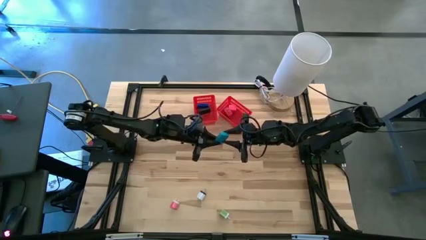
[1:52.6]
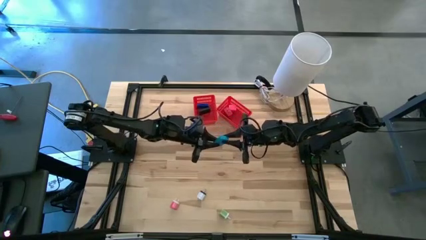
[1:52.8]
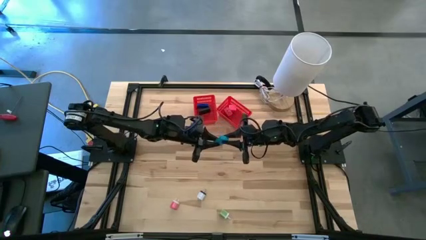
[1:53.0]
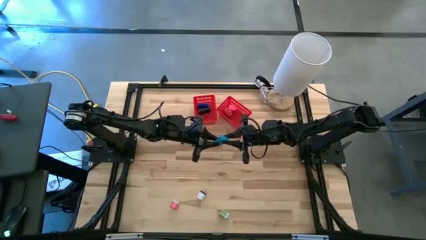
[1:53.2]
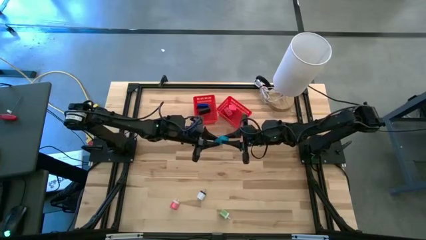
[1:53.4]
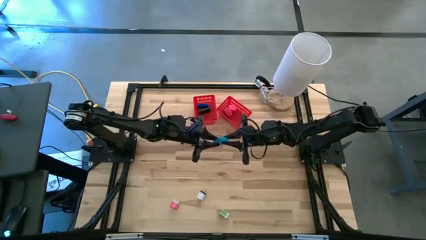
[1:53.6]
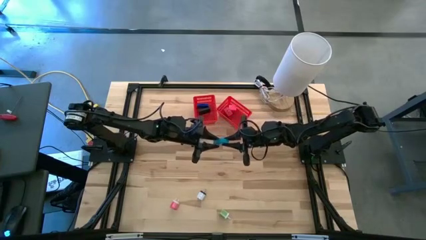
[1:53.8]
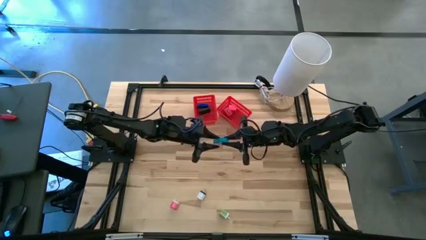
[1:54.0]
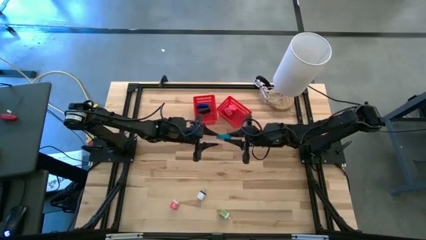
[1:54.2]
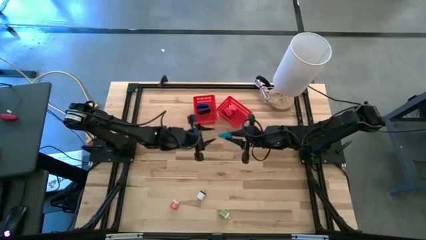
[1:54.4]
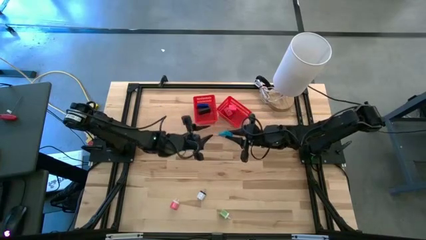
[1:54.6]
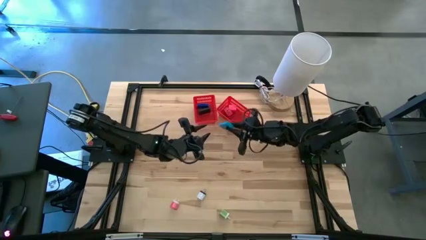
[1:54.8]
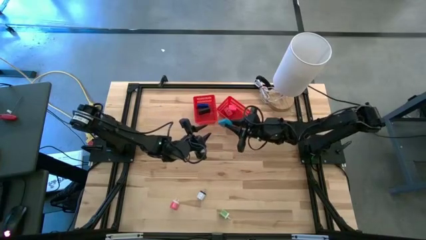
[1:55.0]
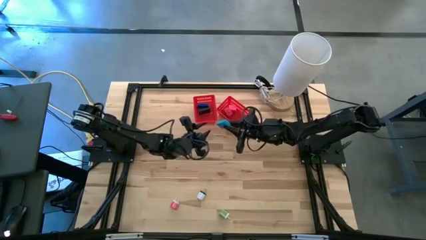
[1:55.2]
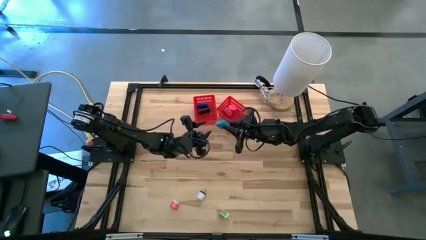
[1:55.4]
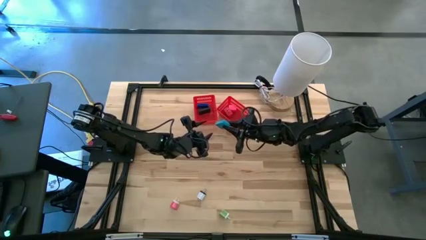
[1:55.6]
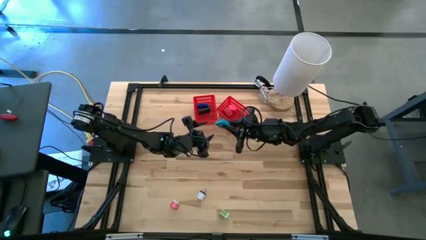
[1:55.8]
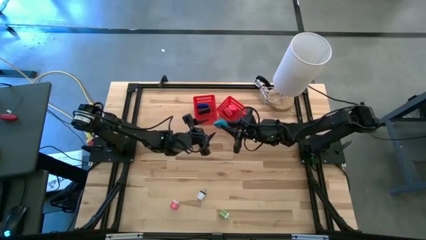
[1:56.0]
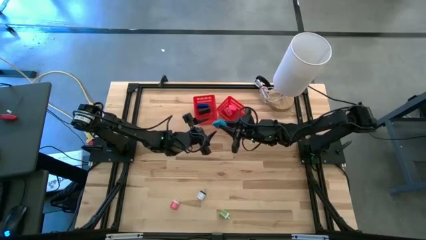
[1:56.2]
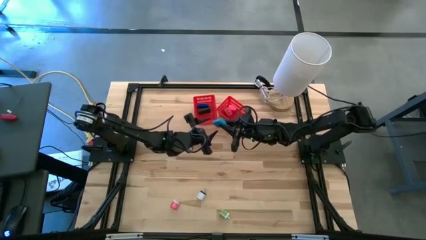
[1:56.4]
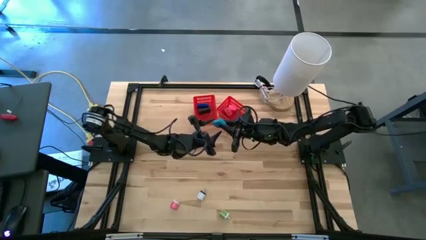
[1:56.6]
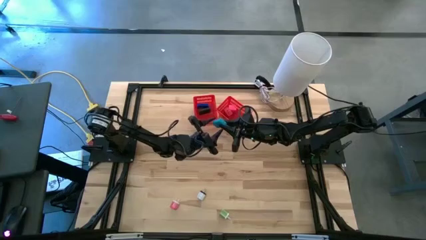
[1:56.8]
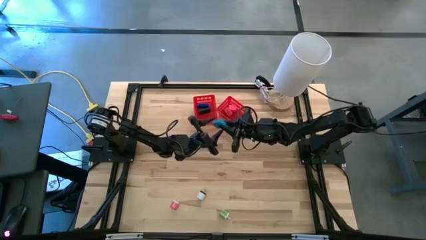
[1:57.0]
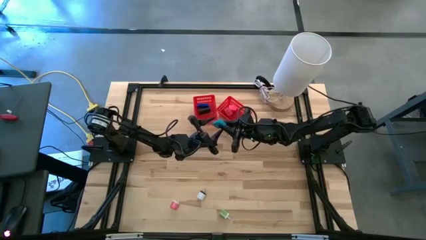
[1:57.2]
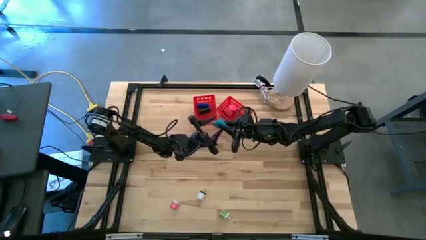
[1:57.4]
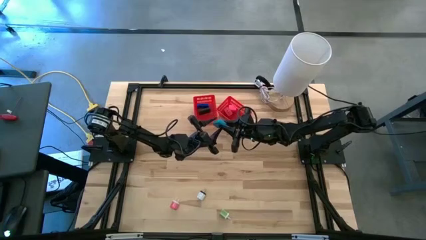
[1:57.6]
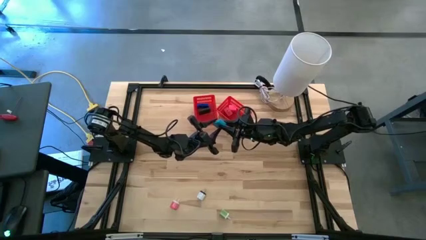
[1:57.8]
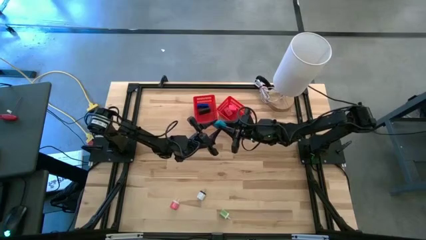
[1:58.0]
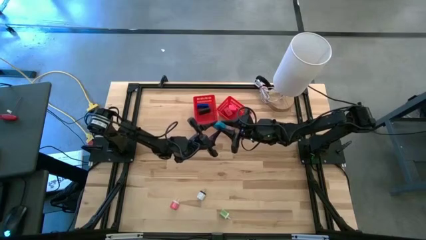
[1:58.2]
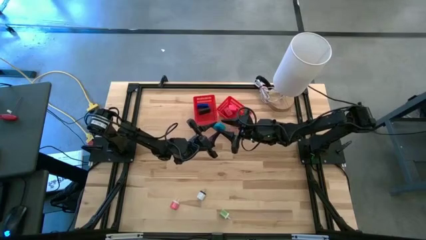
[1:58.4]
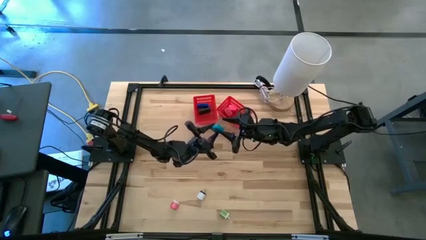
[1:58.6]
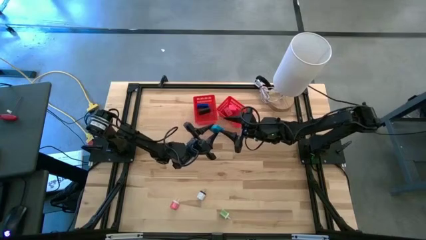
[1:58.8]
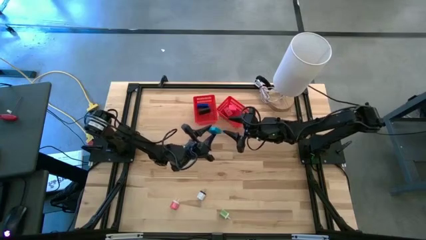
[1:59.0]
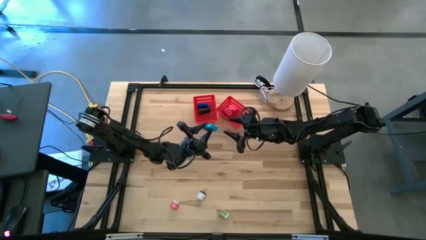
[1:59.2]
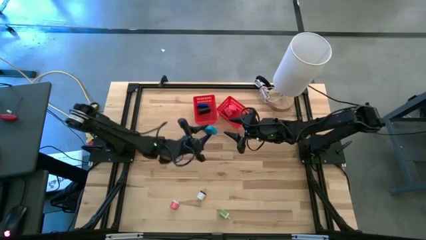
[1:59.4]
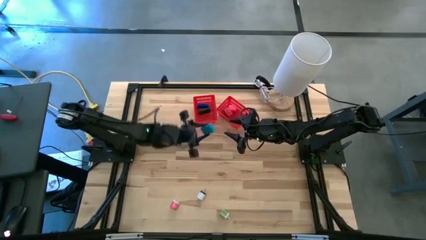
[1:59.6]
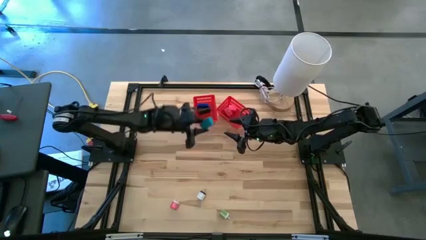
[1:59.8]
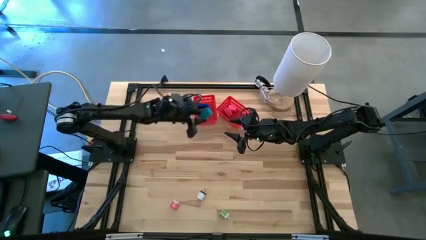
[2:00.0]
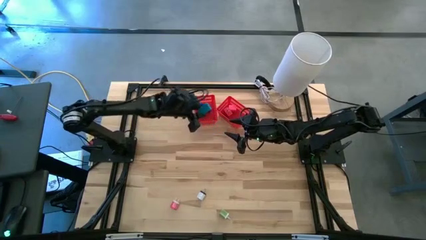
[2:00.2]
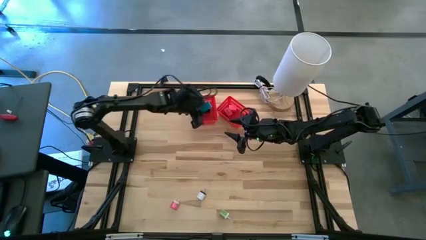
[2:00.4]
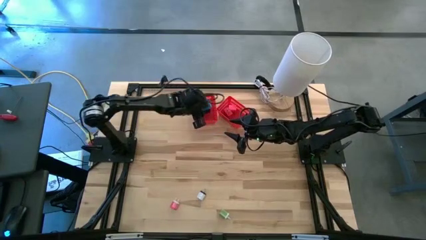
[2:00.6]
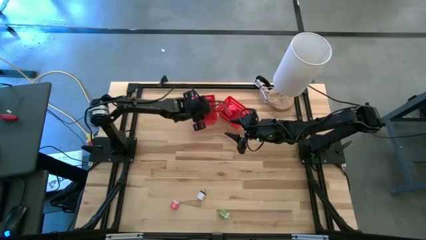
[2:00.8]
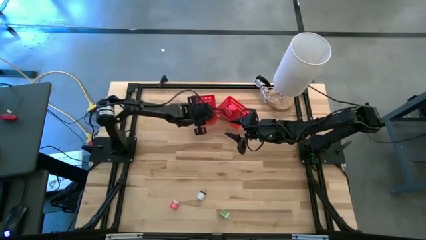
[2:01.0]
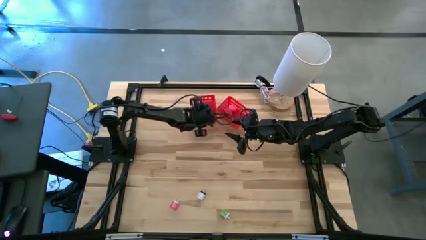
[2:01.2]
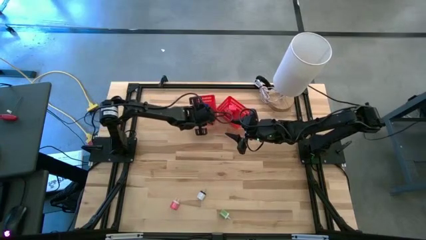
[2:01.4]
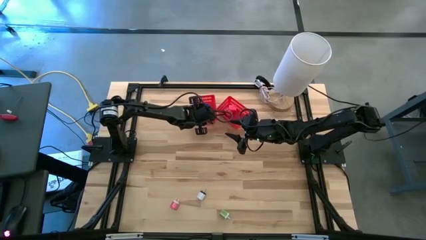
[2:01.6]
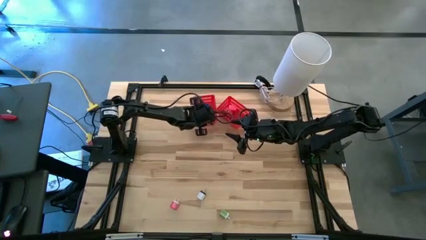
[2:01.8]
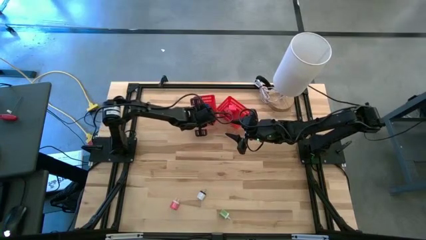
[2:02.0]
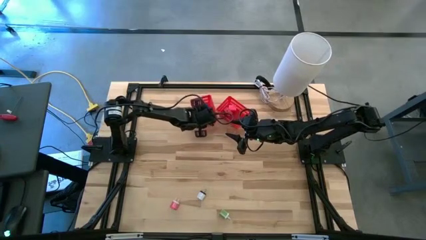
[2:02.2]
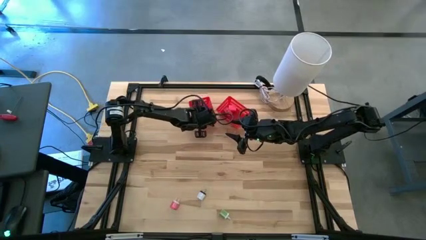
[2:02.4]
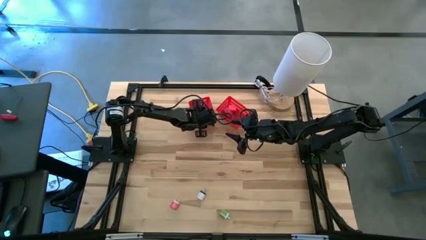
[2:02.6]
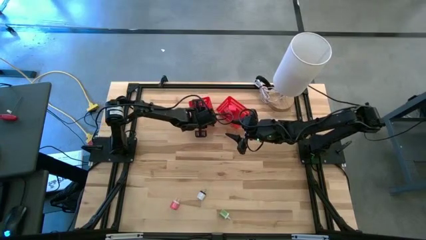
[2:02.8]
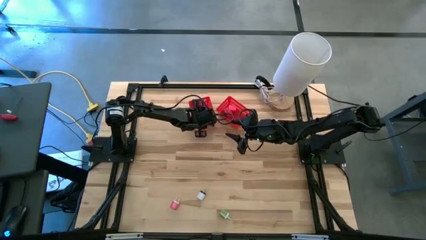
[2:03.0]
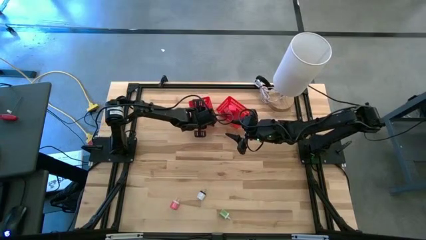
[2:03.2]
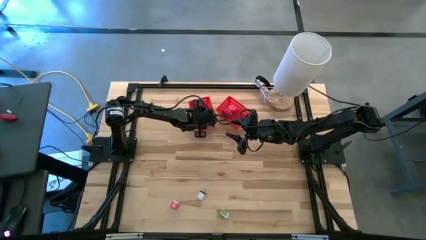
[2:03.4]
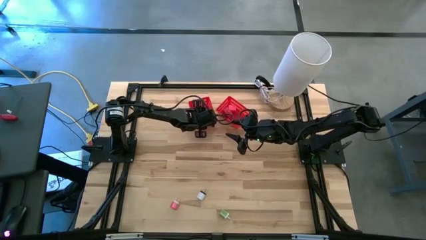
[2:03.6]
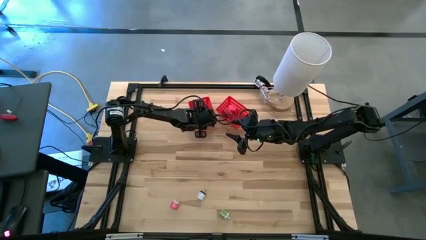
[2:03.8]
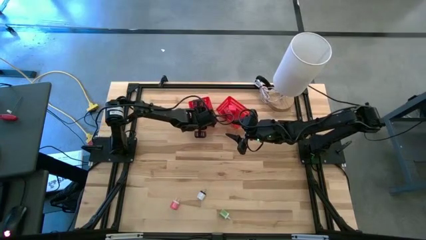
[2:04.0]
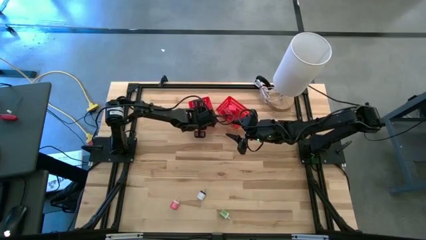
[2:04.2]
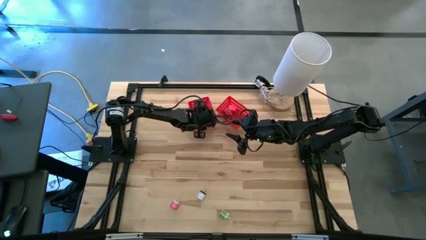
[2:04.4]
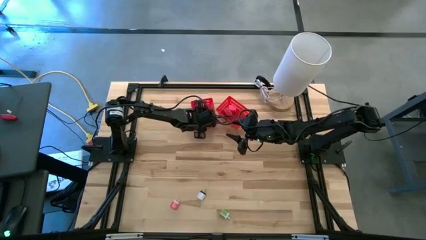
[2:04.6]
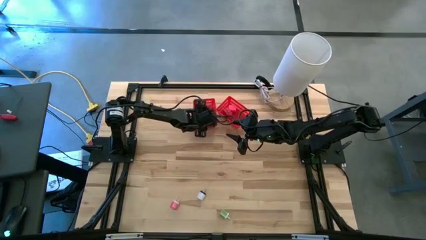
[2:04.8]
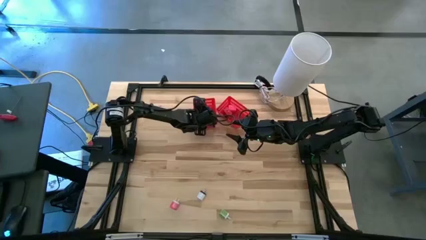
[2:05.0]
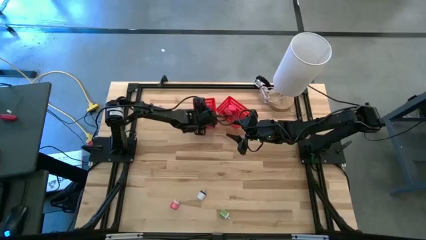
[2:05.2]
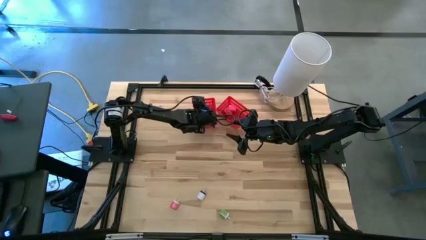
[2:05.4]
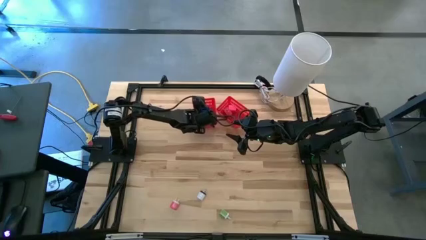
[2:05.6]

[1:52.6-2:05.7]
Task: Pick & Place Office items
Put the light blue digital clock into the left red bin
